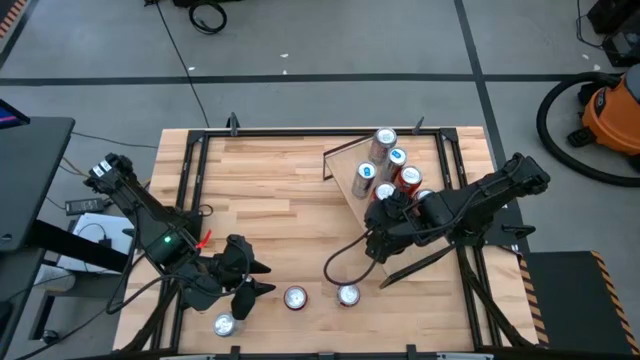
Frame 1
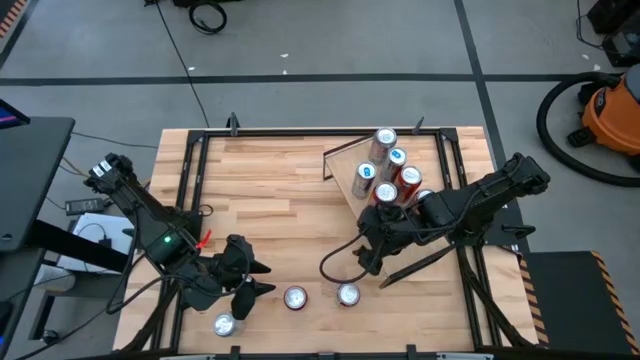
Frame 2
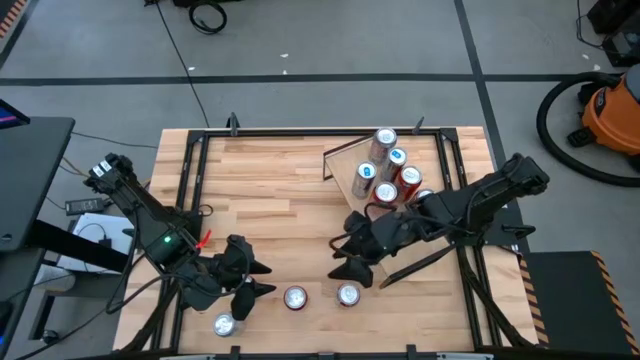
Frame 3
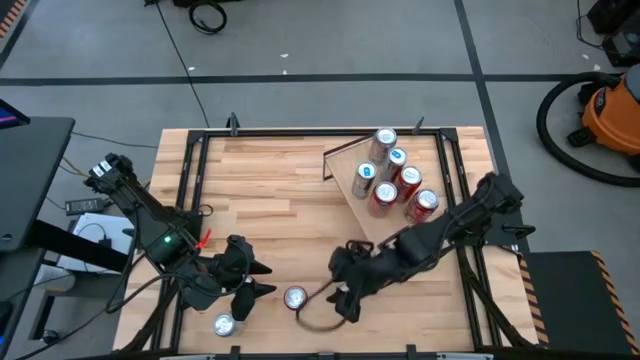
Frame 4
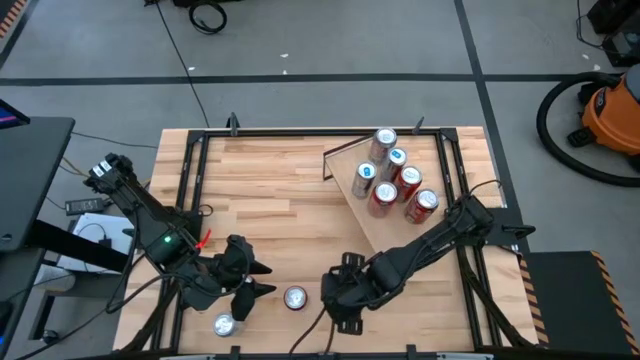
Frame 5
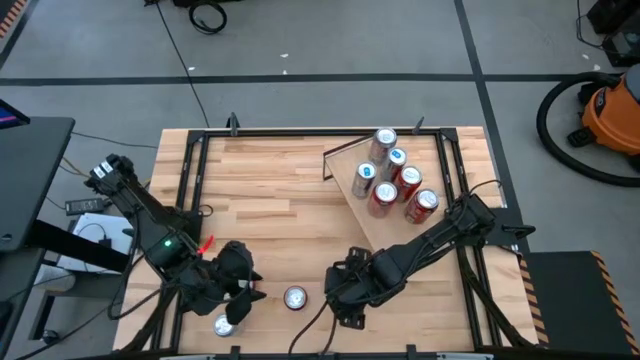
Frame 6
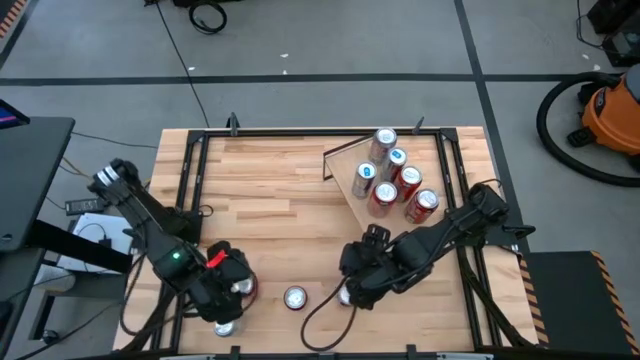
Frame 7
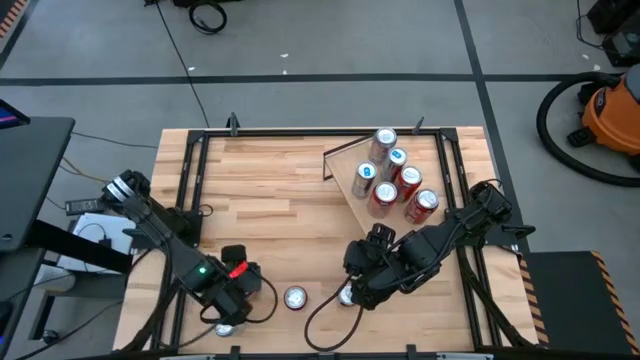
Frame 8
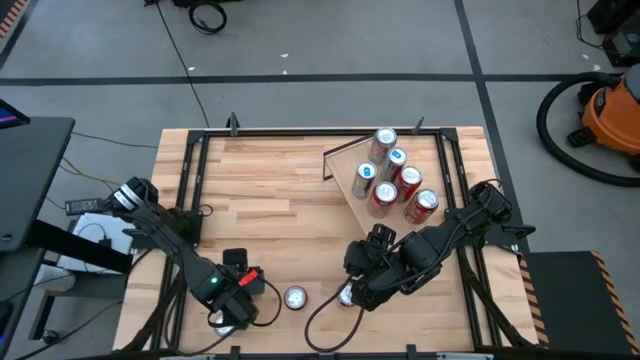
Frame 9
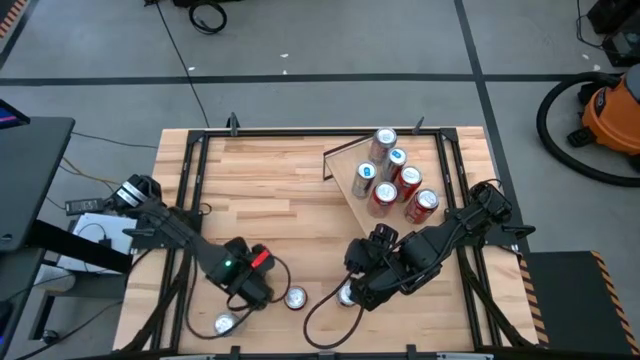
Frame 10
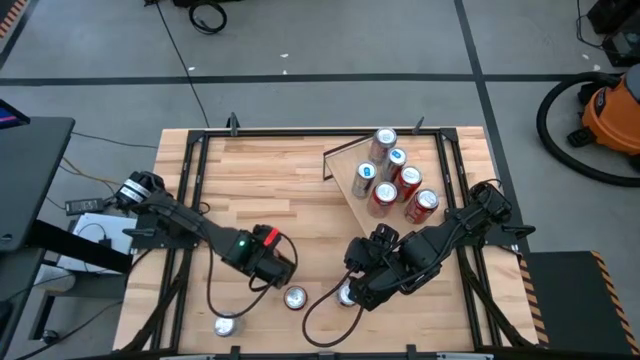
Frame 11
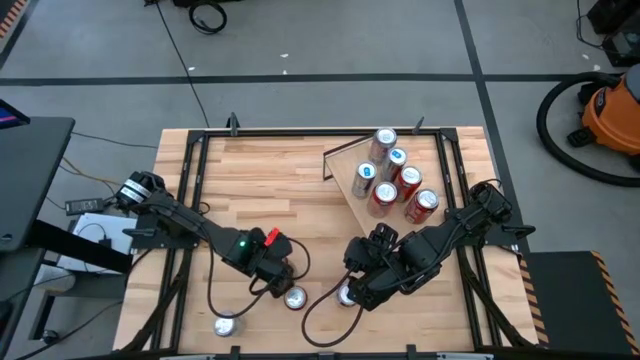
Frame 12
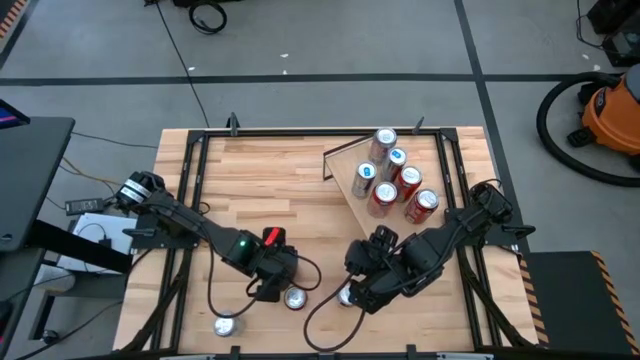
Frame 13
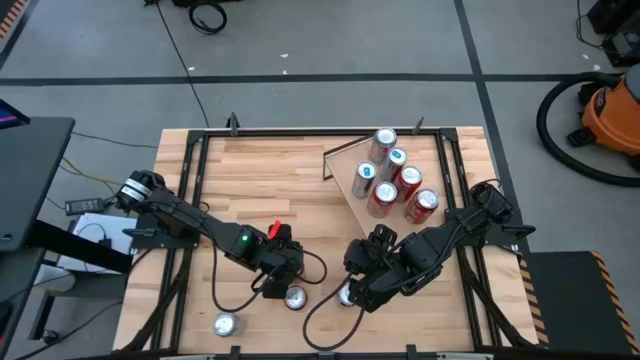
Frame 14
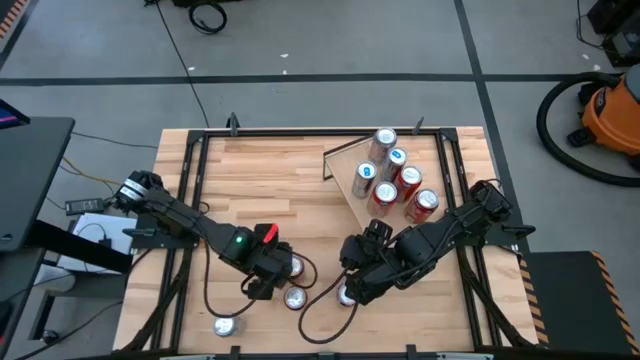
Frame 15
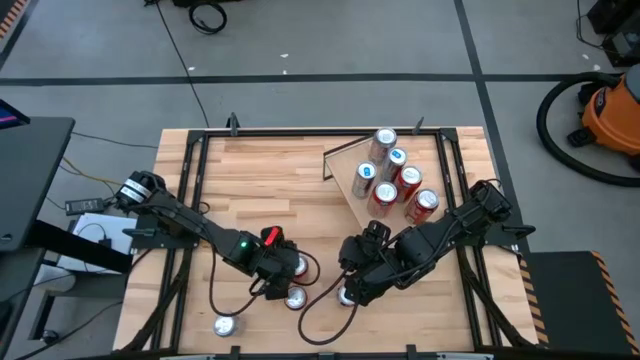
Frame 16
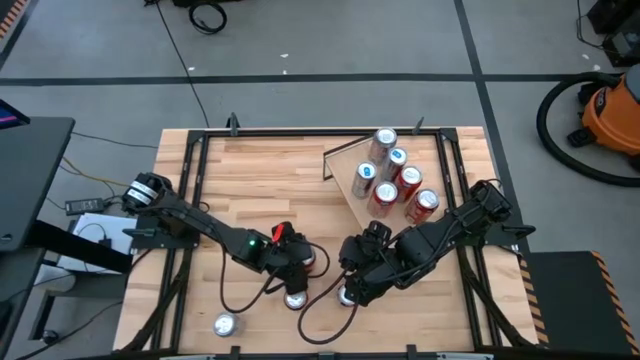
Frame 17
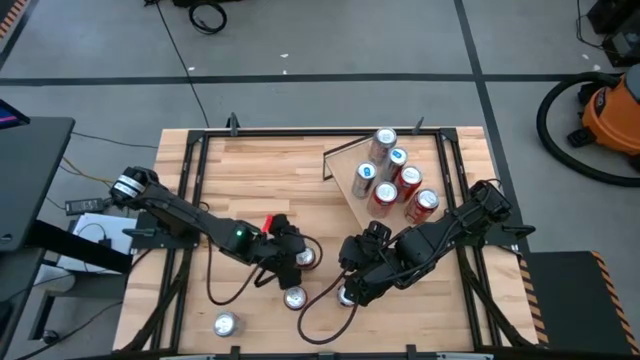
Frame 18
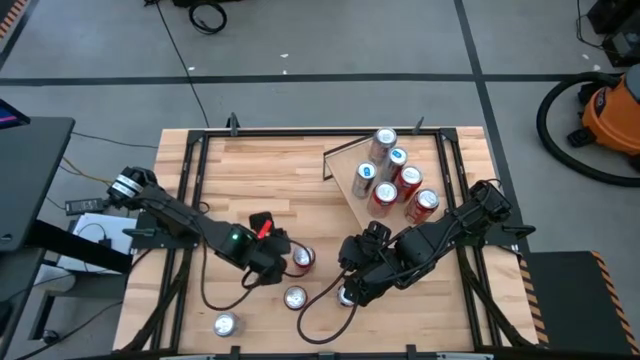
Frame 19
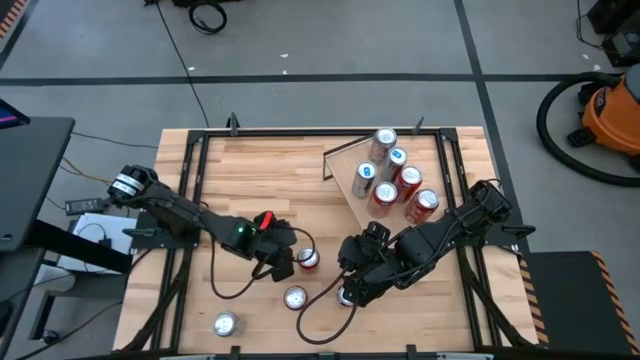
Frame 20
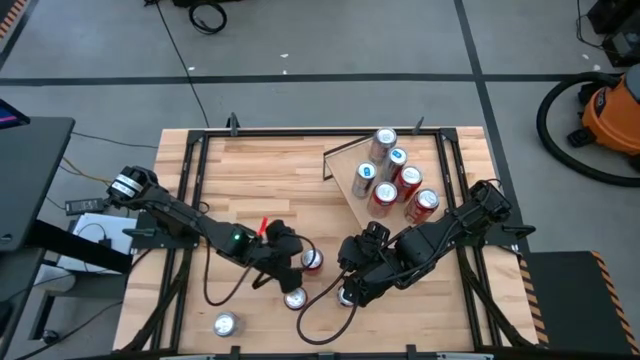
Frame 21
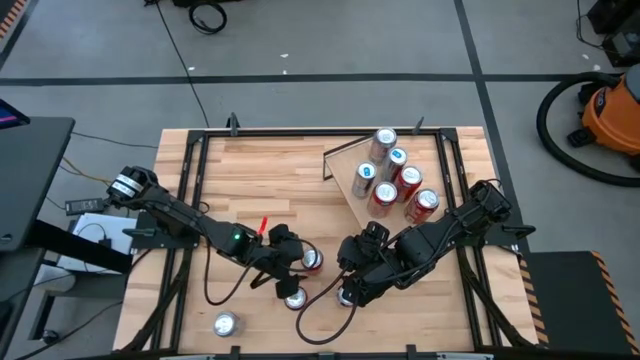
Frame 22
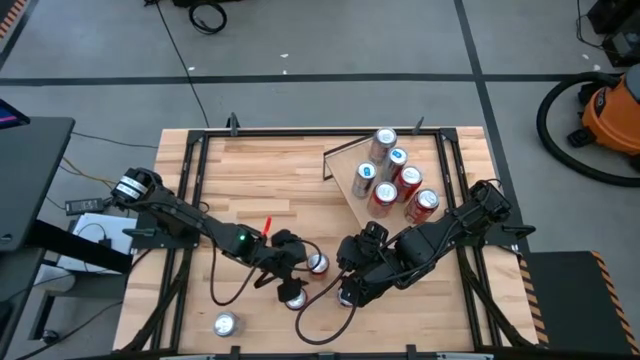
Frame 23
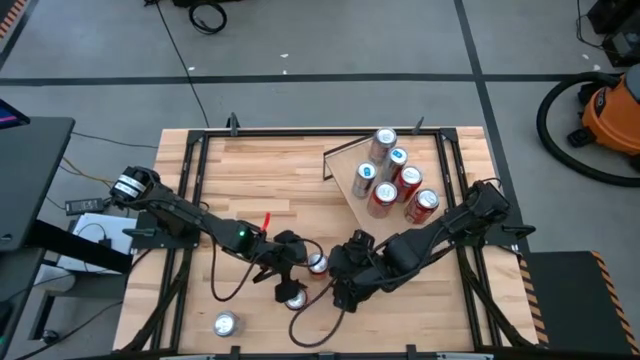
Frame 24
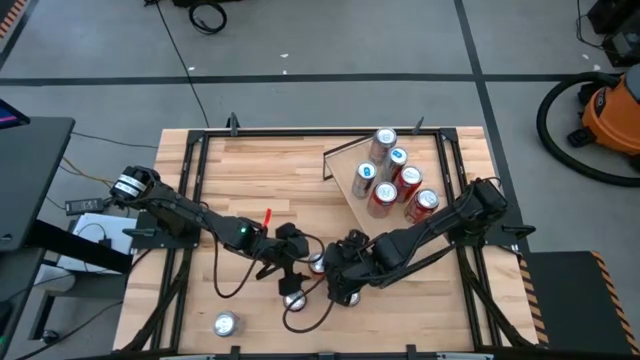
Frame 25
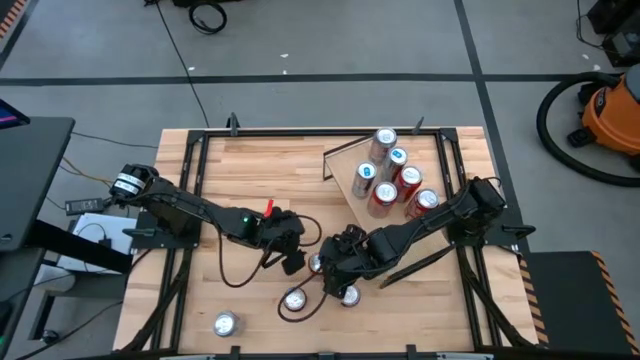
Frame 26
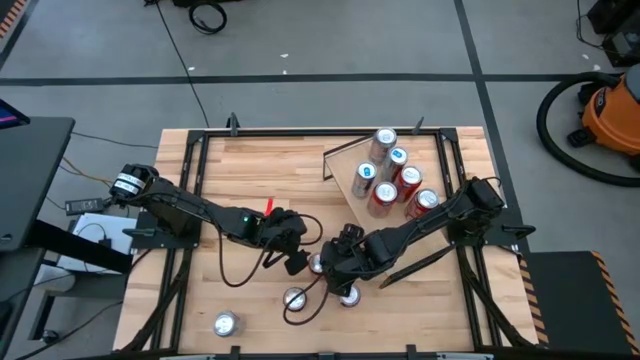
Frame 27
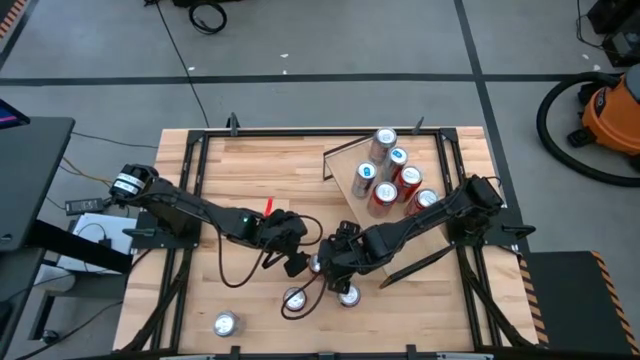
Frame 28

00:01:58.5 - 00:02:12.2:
Task: Place canned beverage on shelf
Put the top left red soda can on the shelf

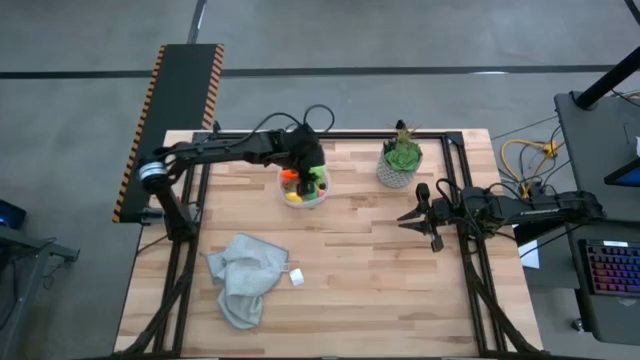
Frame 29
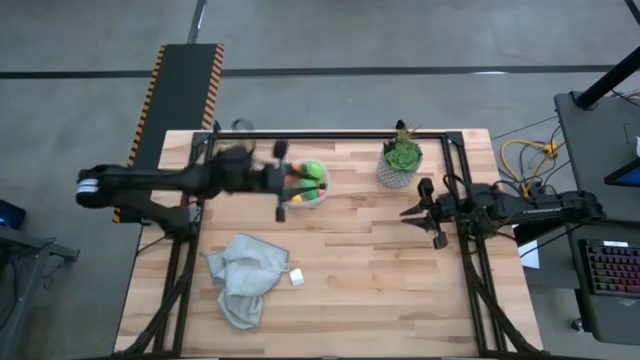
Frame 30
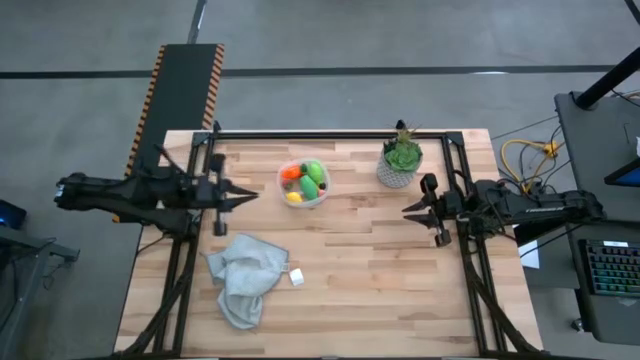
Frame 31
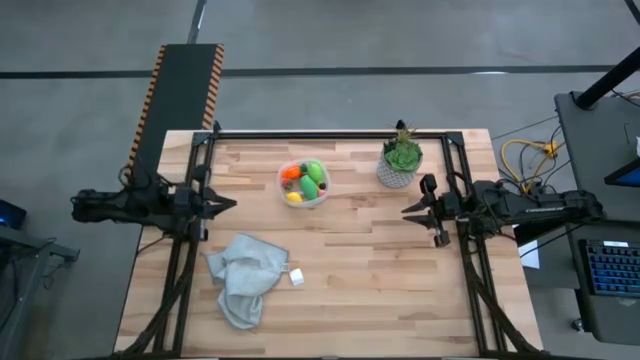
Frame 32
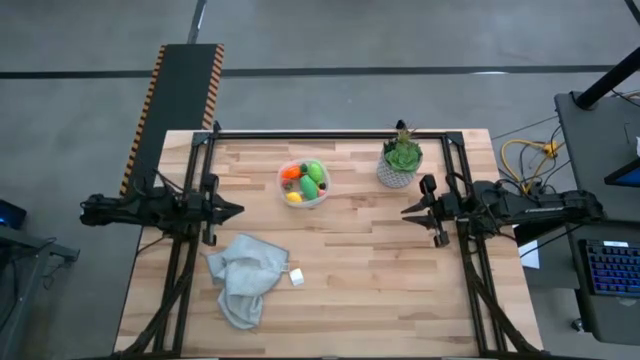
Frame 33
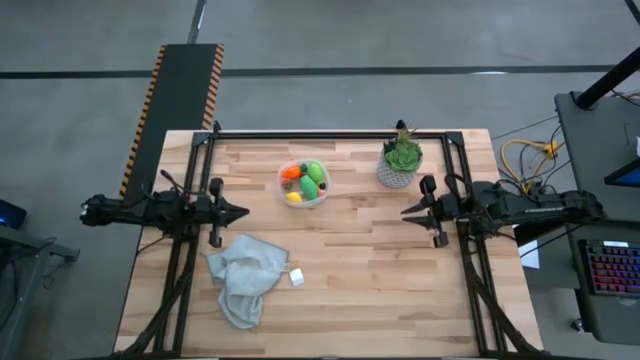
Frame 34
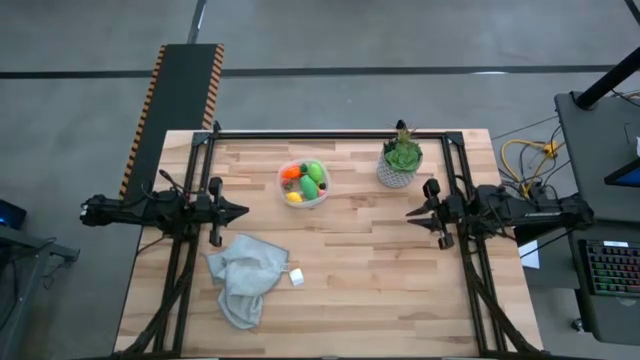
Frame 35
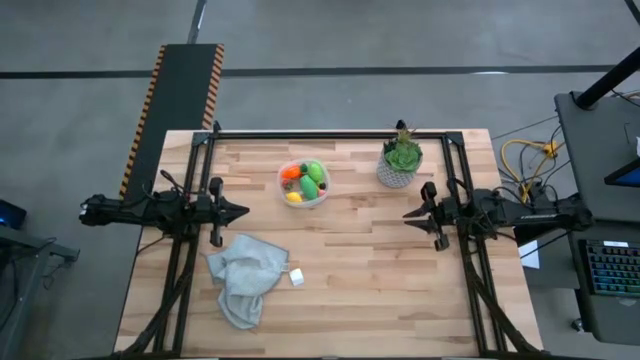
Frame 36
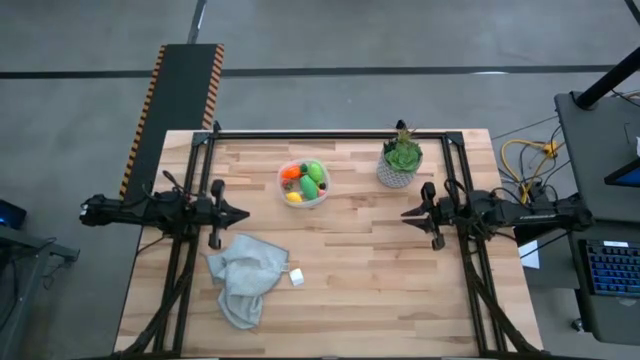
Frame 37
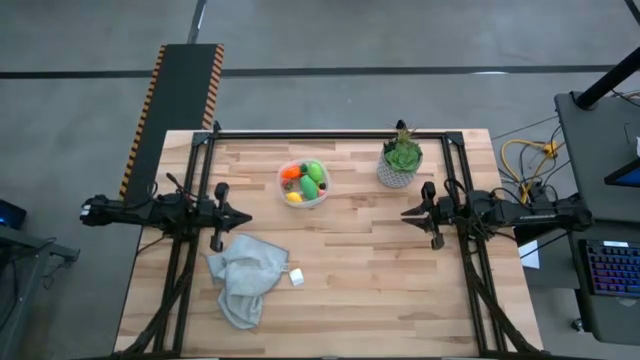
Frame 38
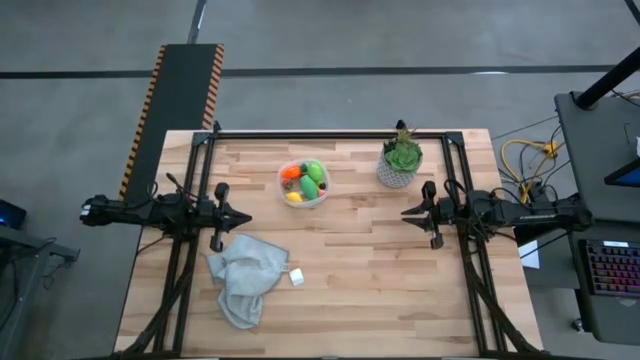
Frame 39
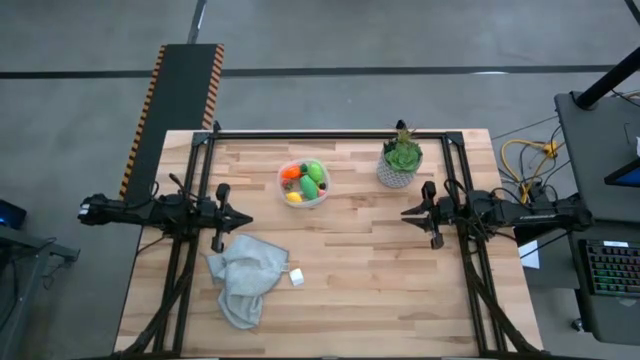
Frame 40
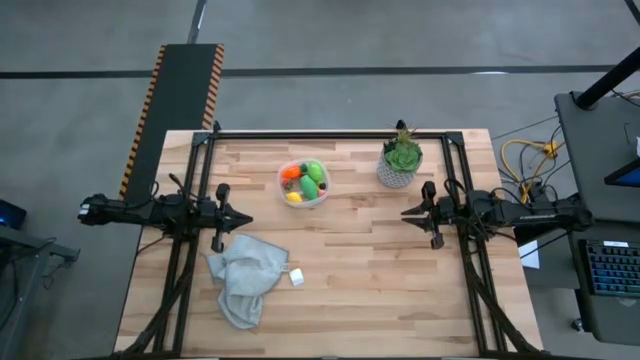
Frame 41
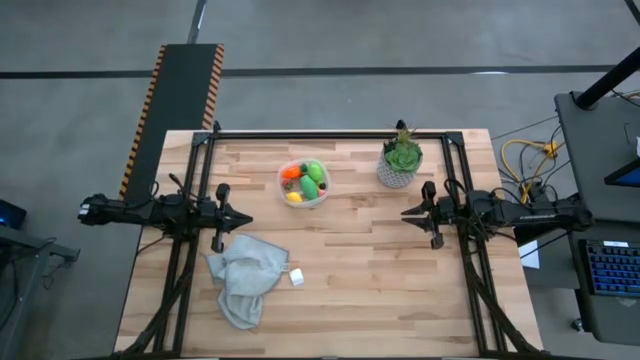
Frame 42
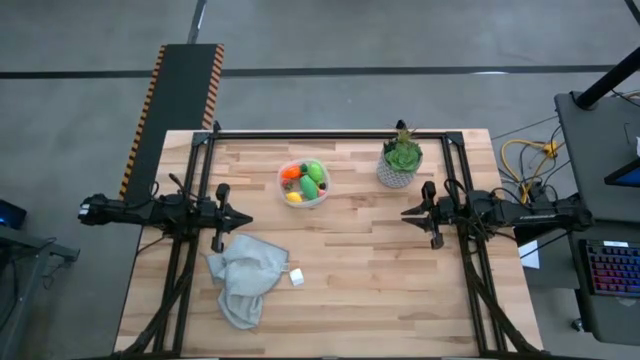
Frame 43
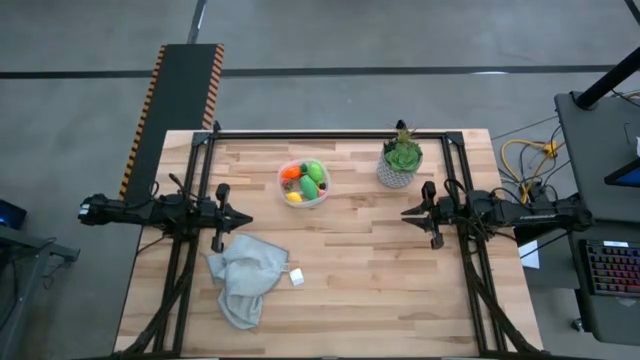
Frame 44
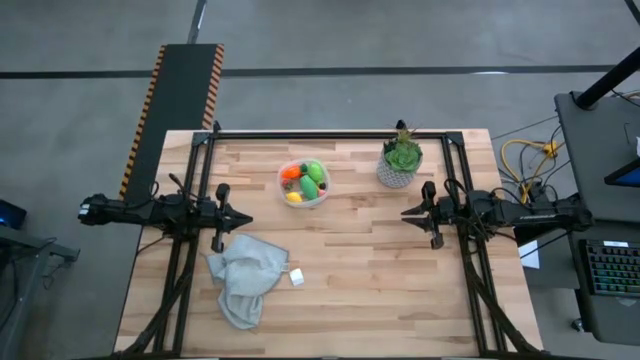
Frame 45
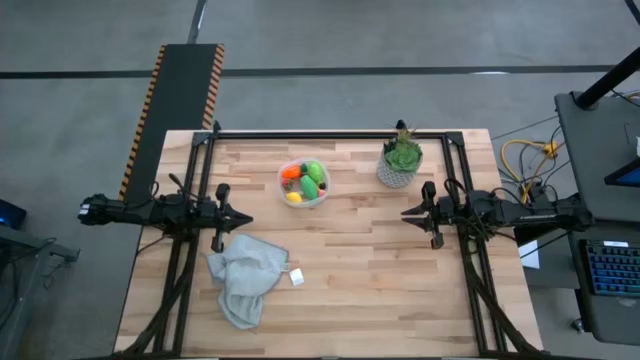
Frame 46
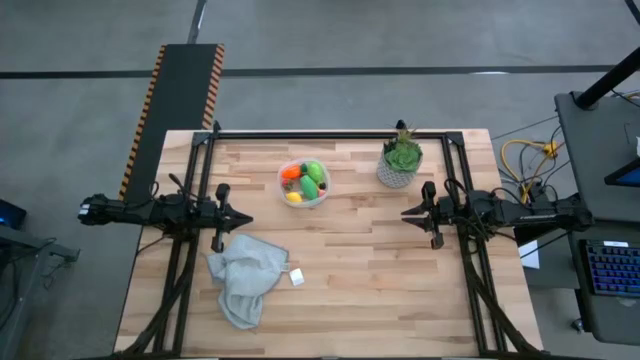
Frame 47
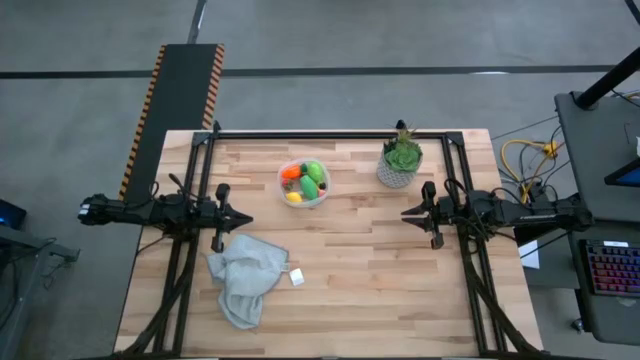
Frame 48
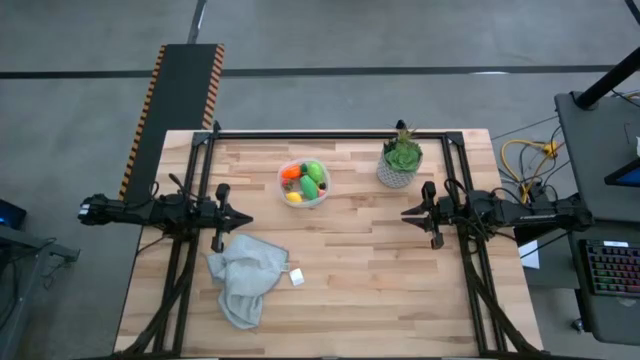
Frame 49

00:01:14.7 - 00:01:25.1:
Task: Pick and placing Produce into tupperware
Return to Home Position
